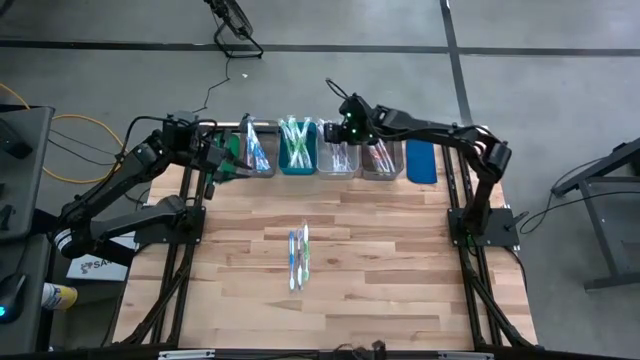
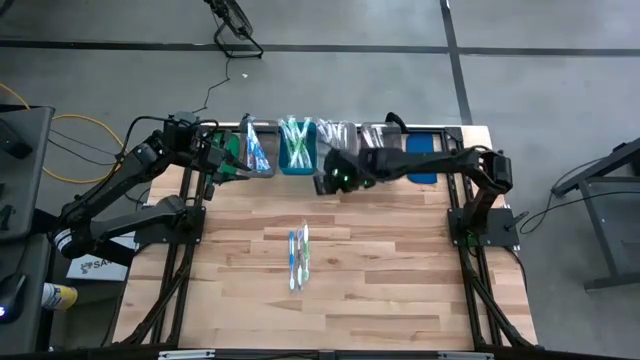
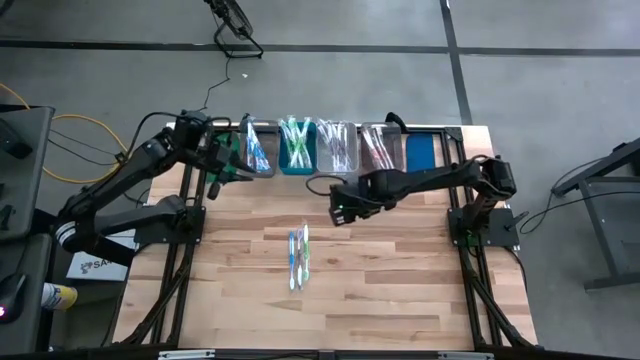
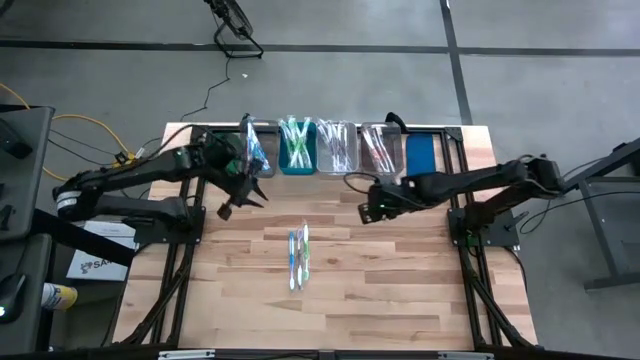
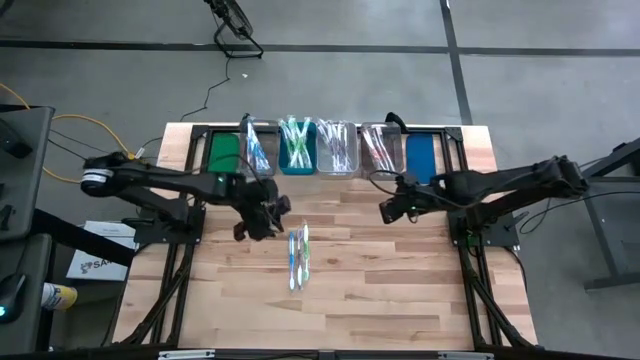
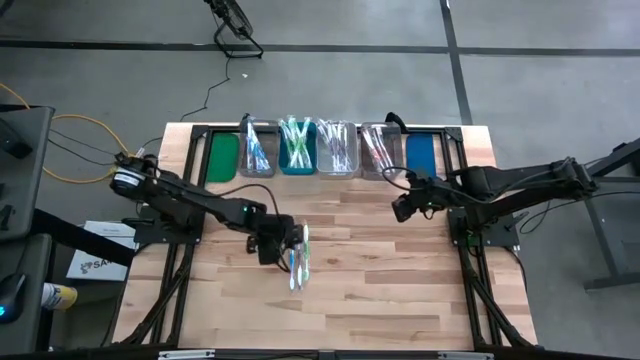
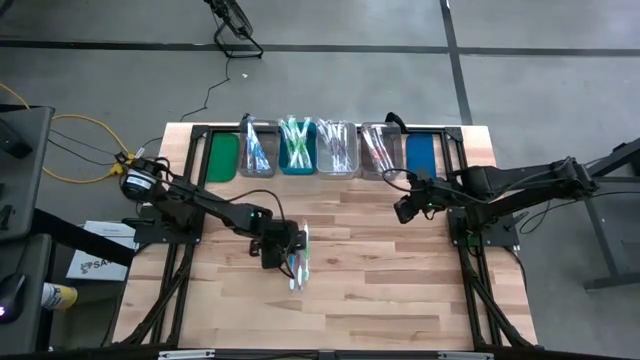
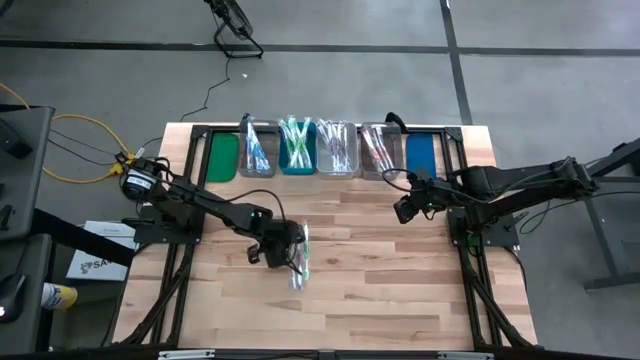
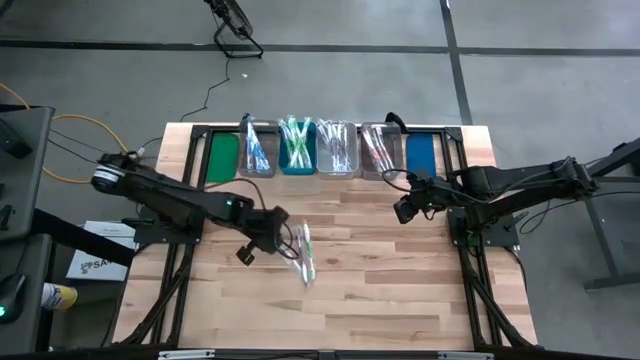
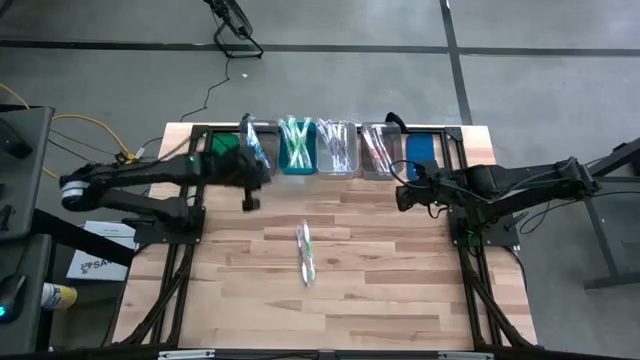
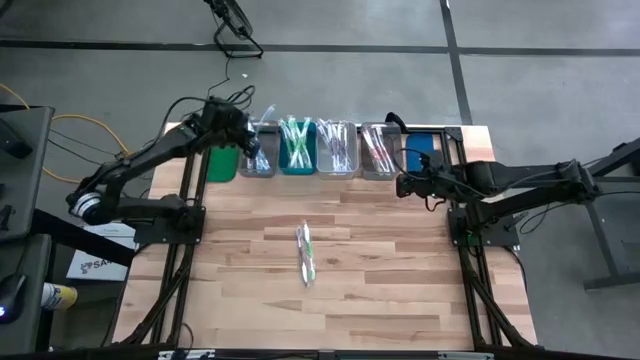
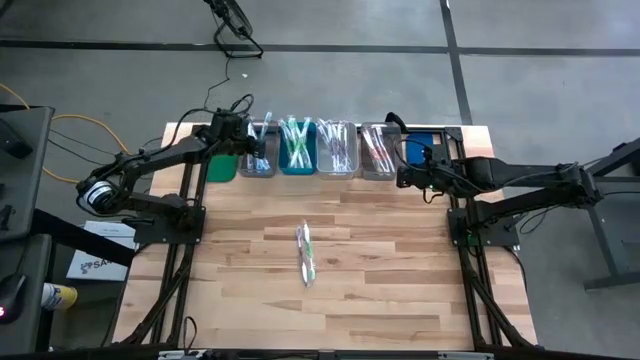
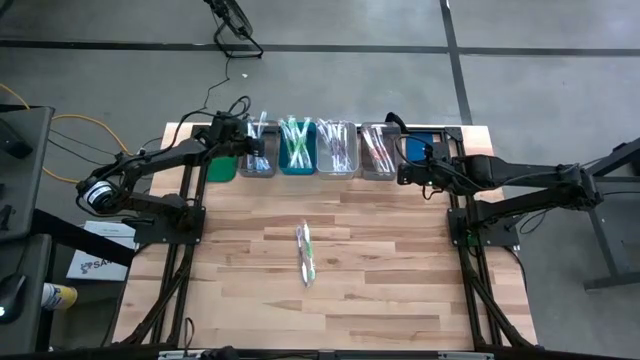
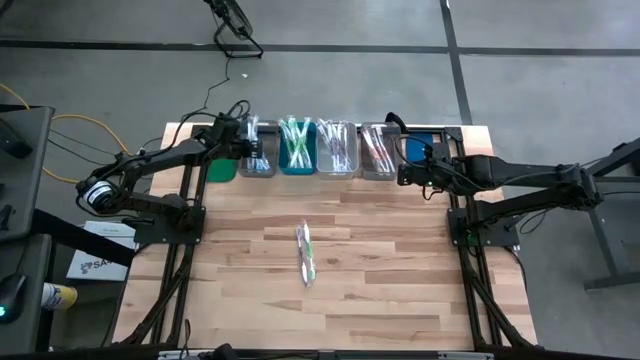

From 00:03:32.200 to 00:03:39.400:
Task: Pick & Place Toothbrushes
Put the blue toothbrush into the left black bin

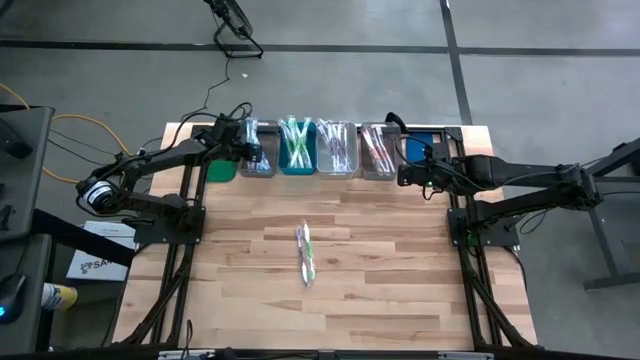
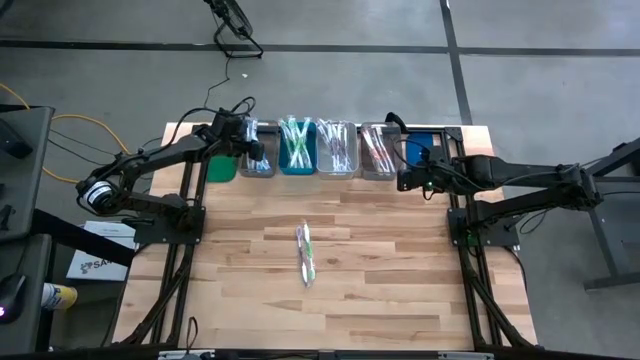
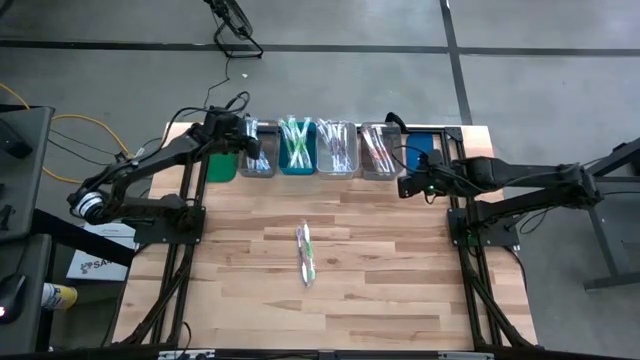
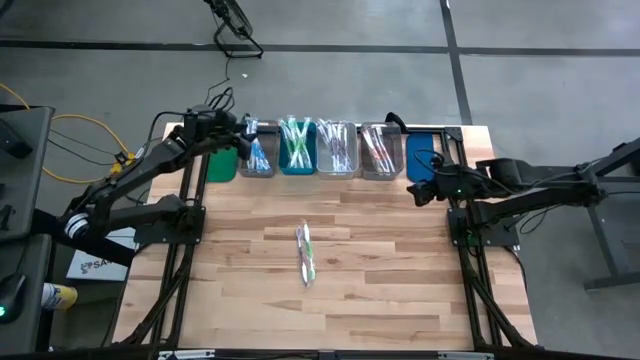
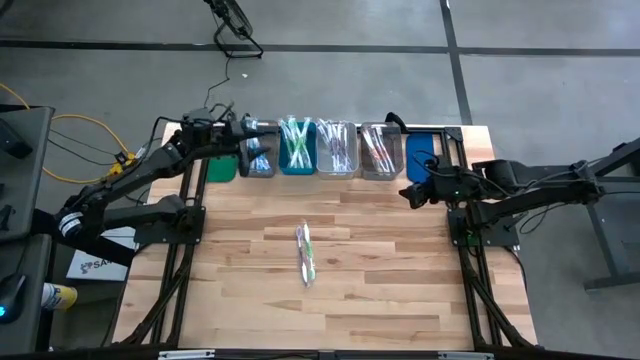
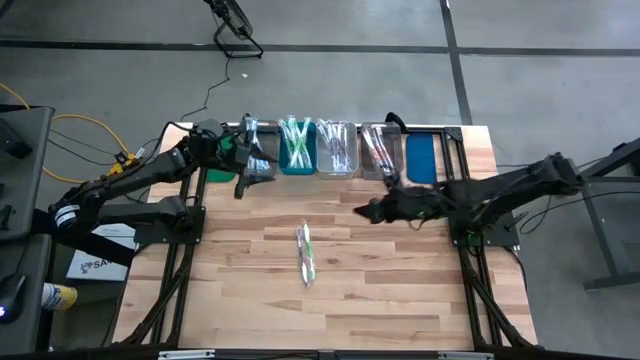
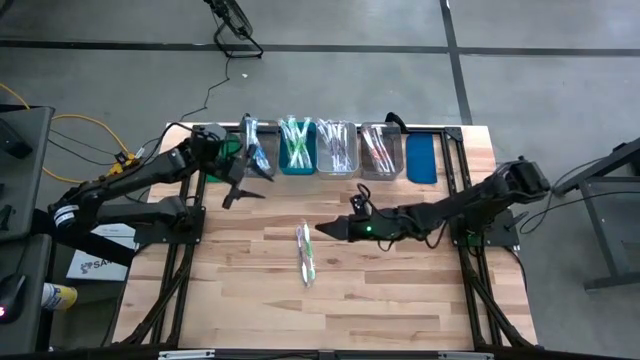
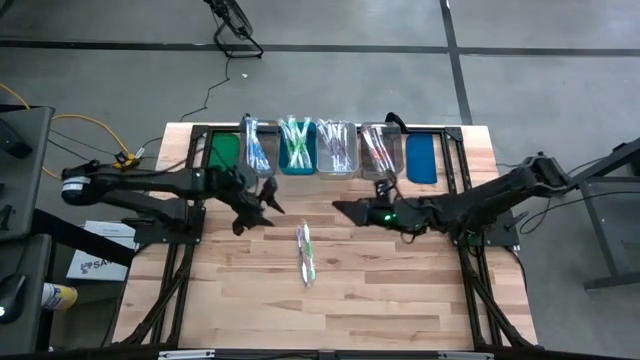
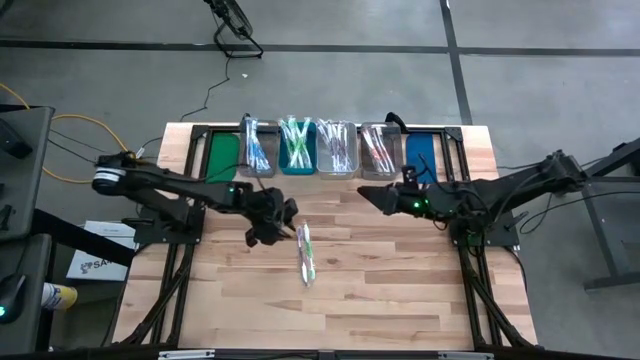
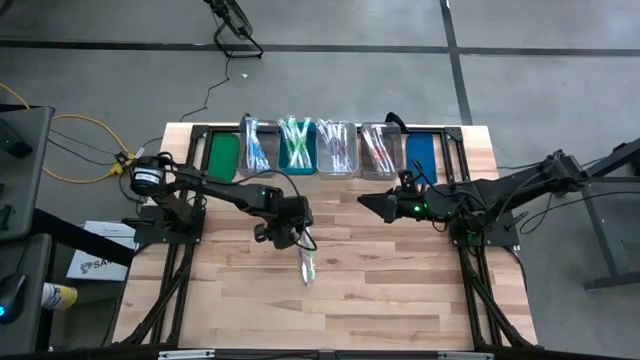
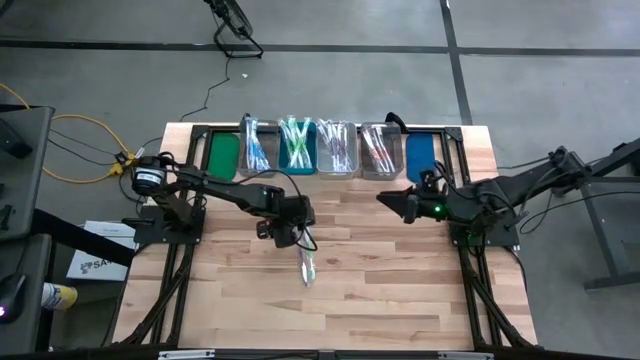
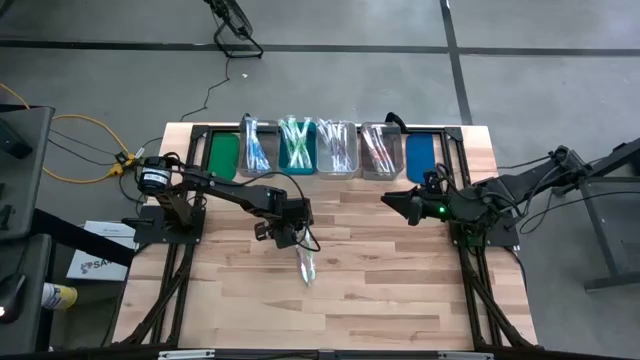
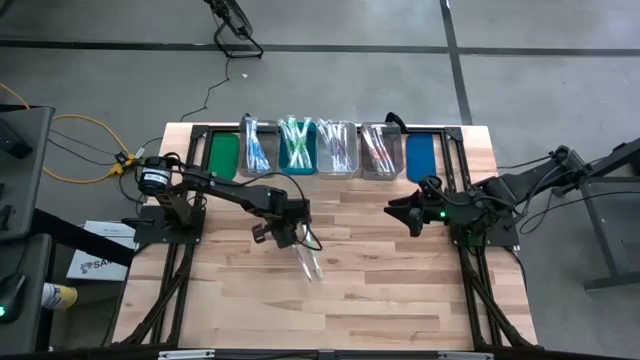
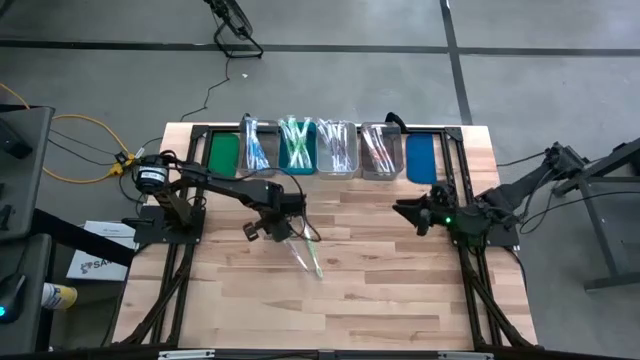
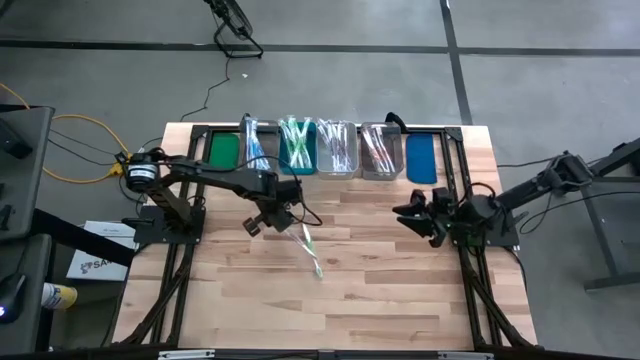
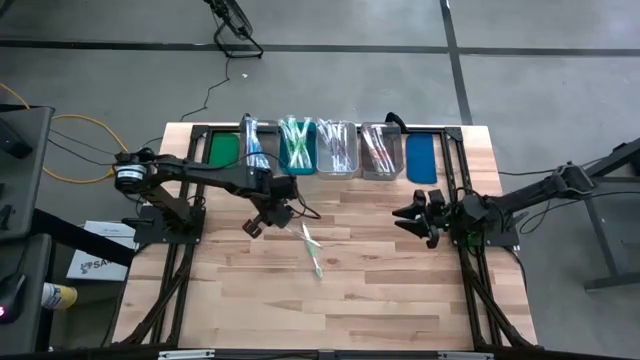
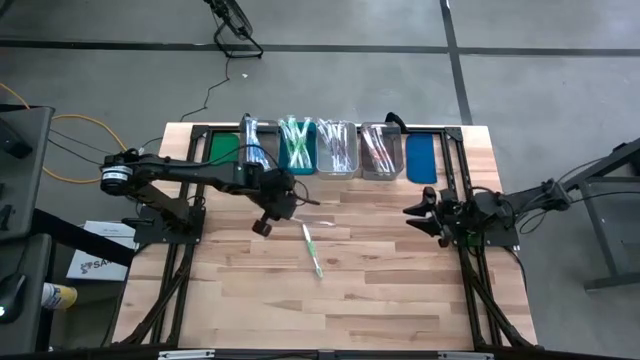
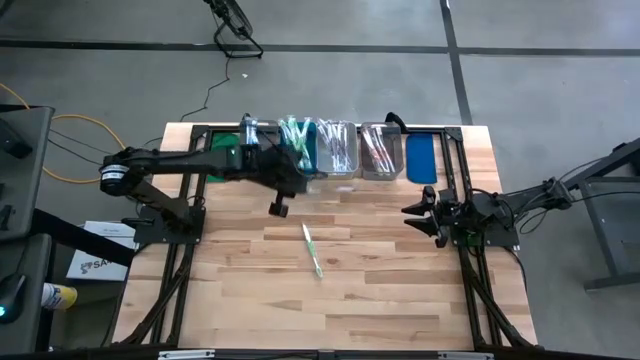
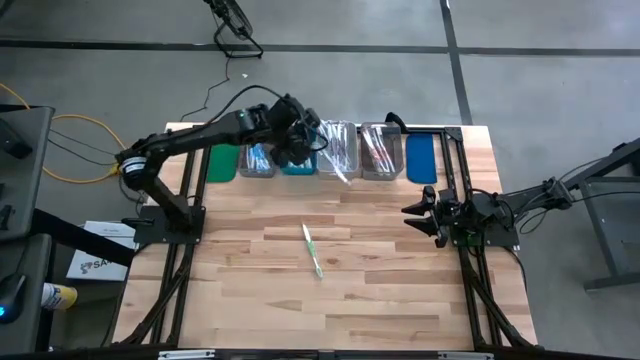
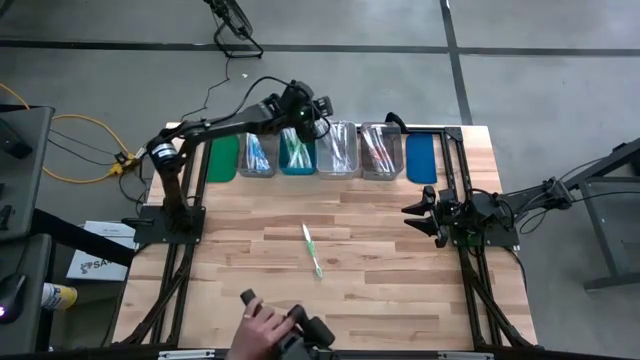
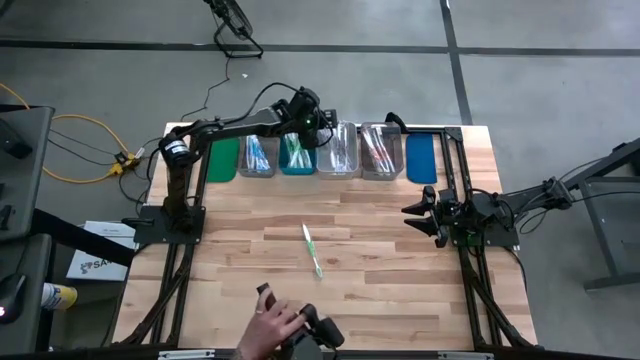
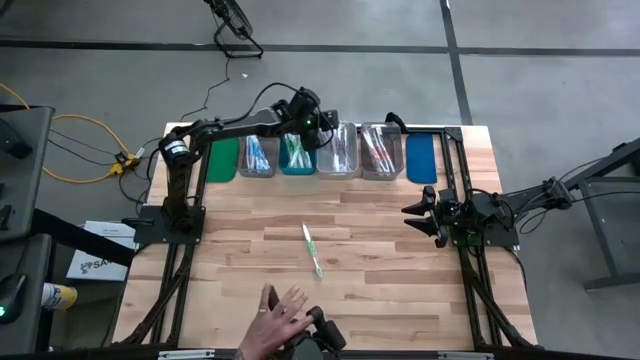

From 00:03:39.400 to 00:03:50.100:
Put the purple toothbrush into the white bin

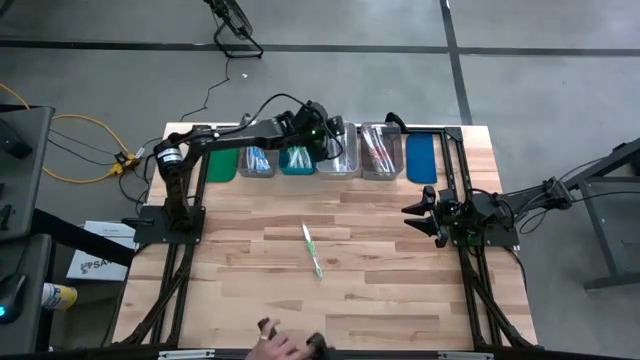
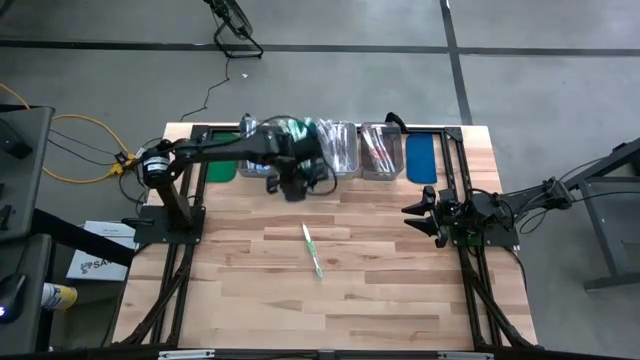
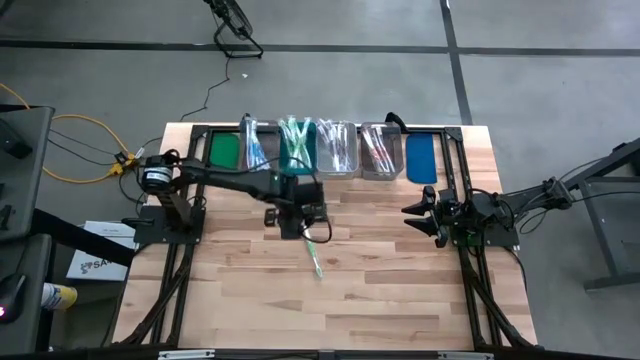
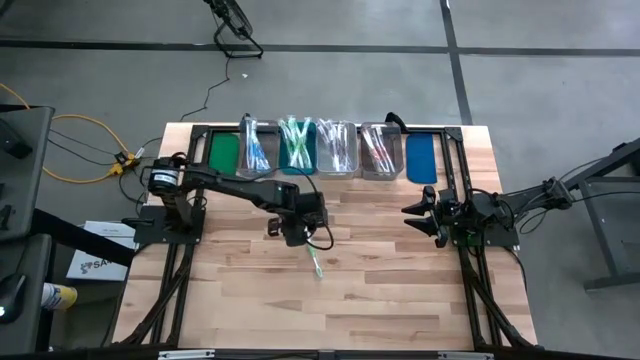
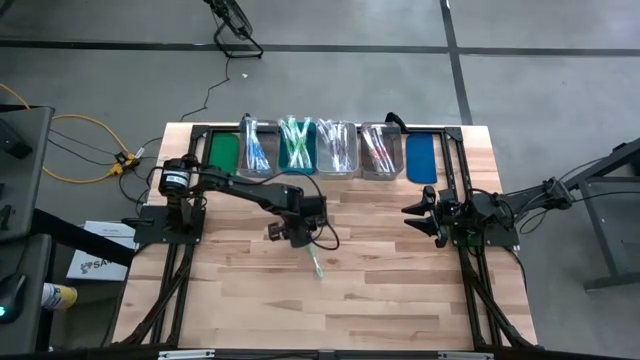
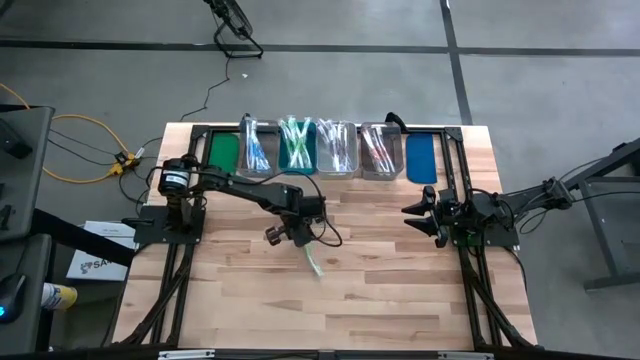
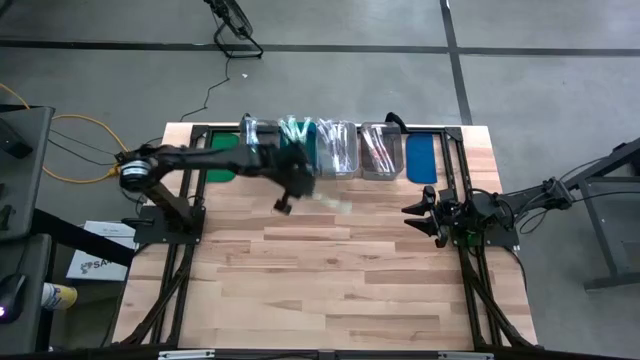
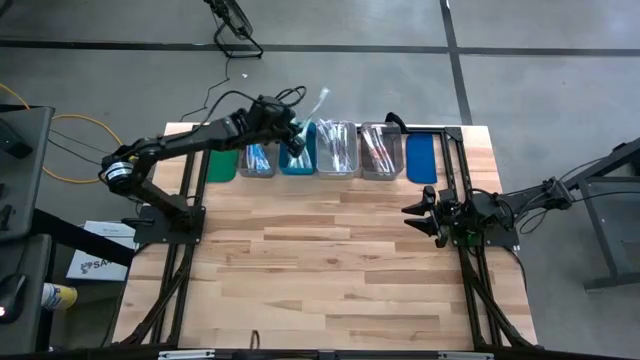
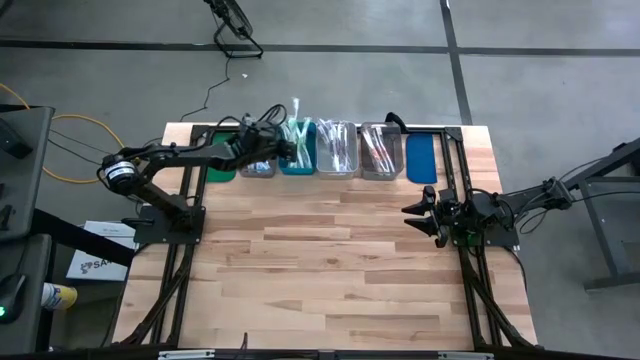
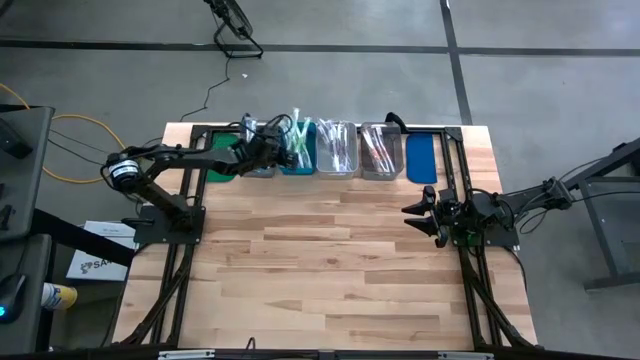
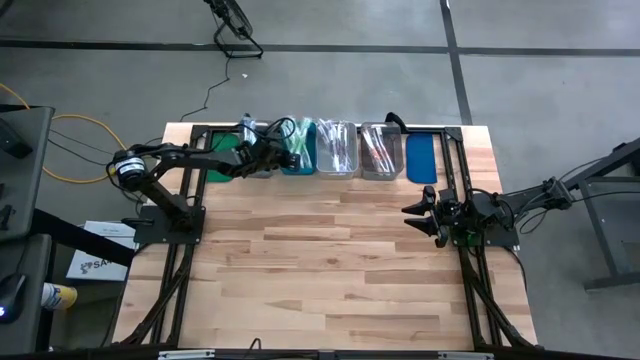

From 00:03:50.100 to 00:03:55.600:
Put the green toothbrush into the blue bin
